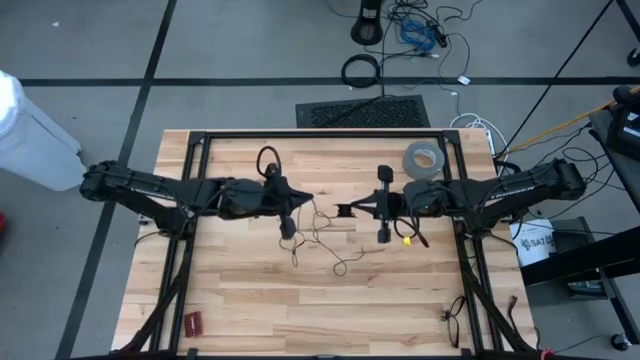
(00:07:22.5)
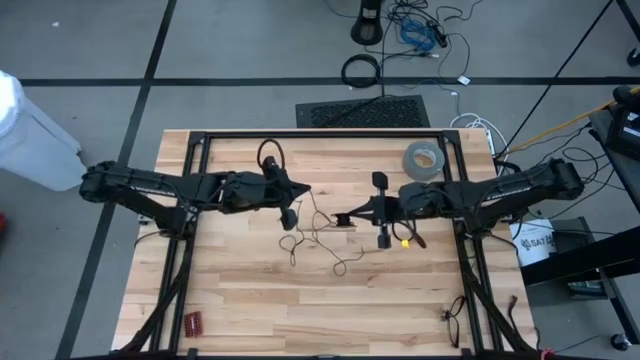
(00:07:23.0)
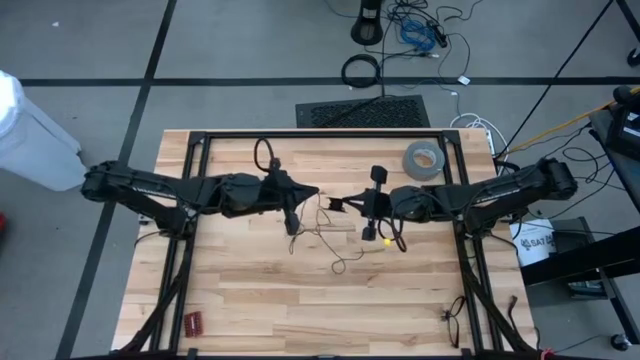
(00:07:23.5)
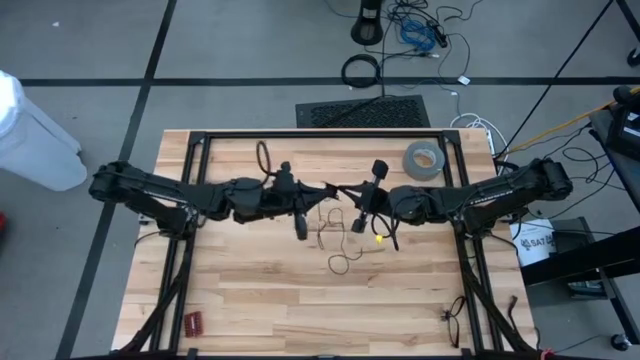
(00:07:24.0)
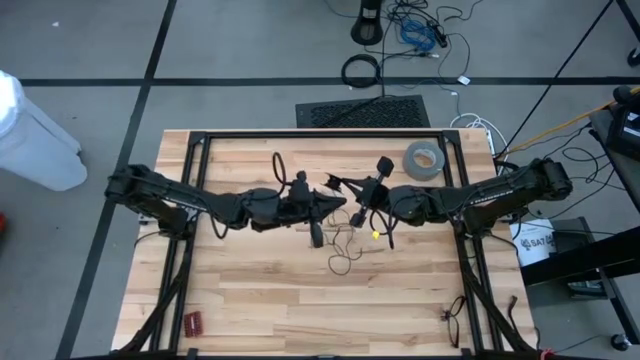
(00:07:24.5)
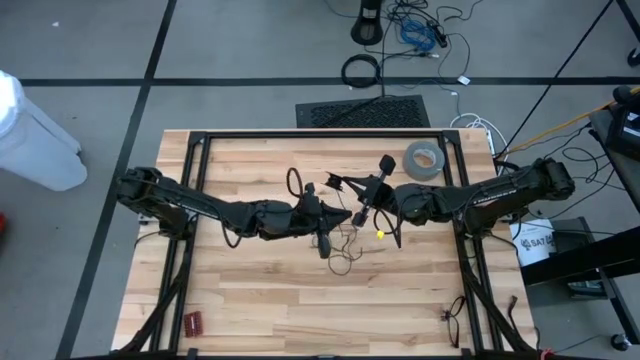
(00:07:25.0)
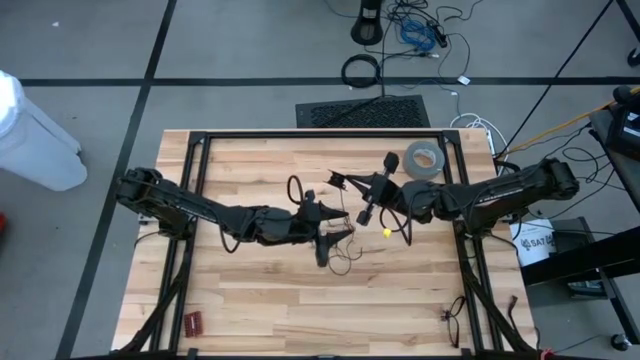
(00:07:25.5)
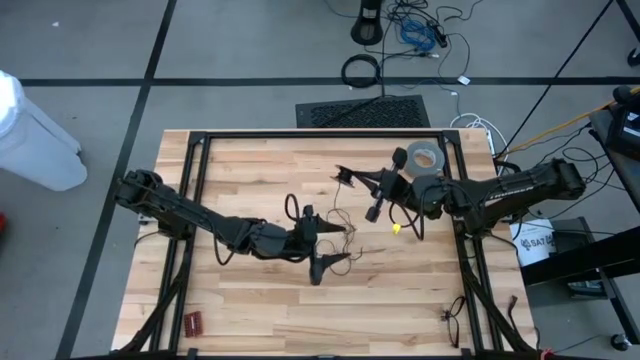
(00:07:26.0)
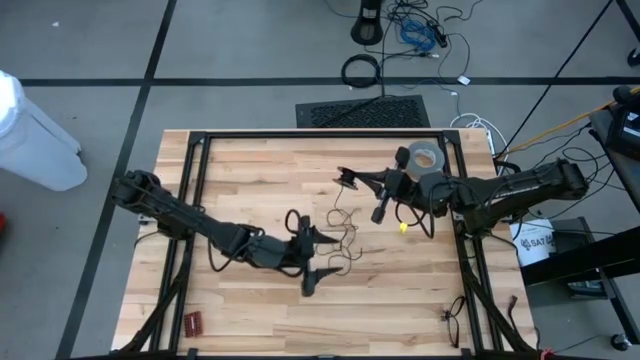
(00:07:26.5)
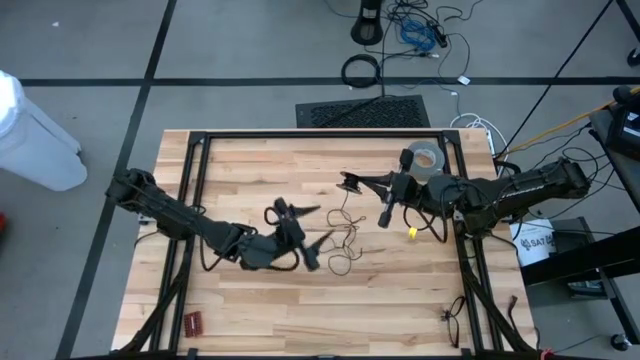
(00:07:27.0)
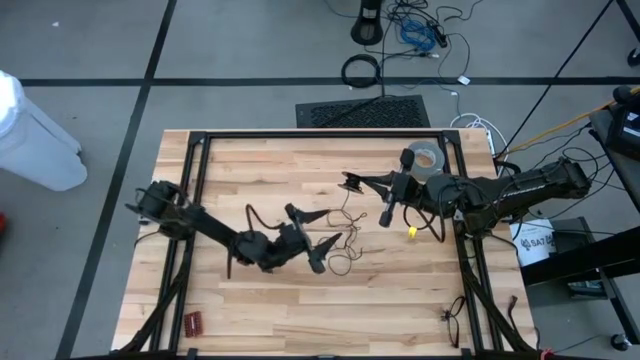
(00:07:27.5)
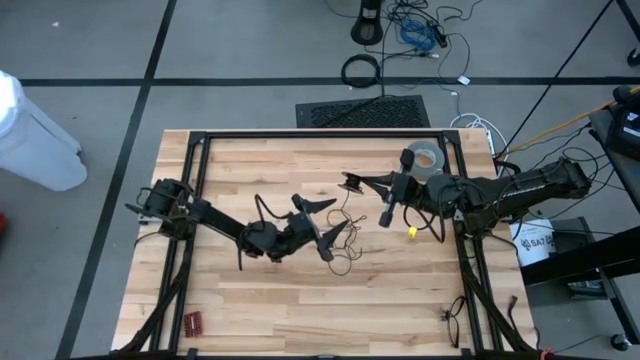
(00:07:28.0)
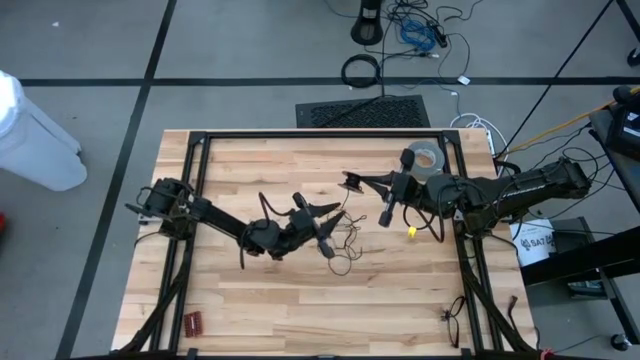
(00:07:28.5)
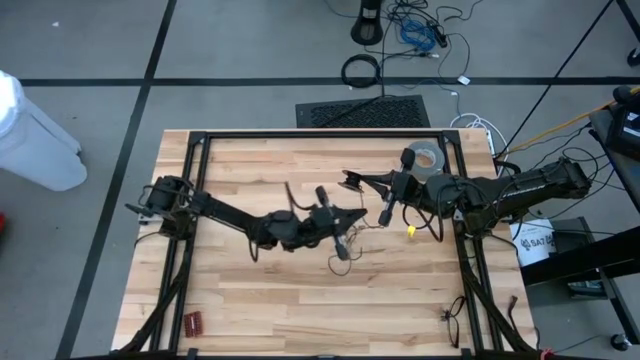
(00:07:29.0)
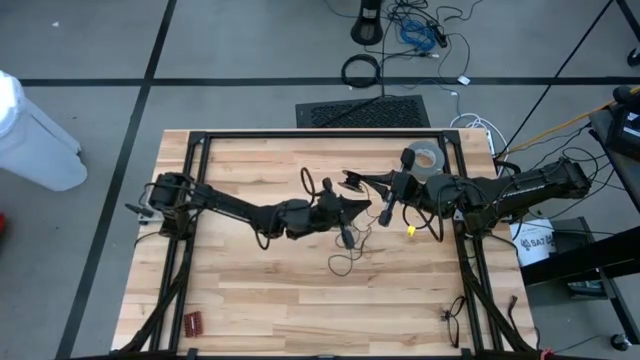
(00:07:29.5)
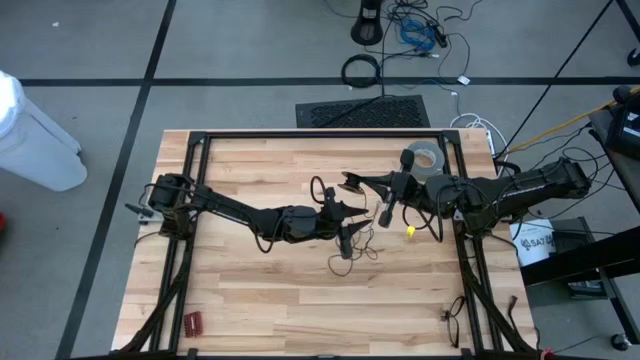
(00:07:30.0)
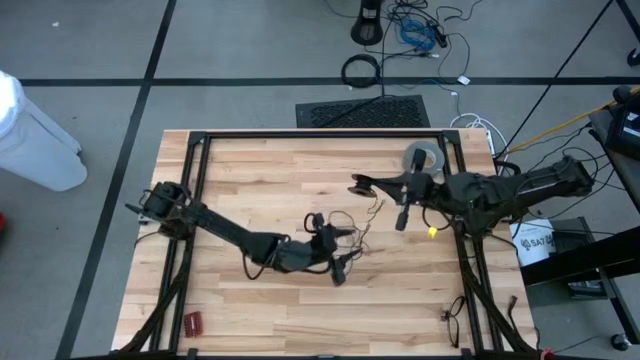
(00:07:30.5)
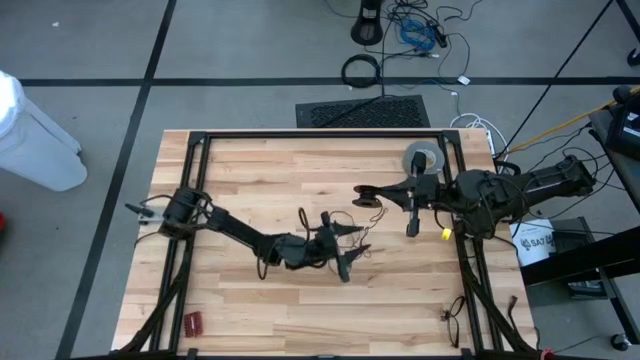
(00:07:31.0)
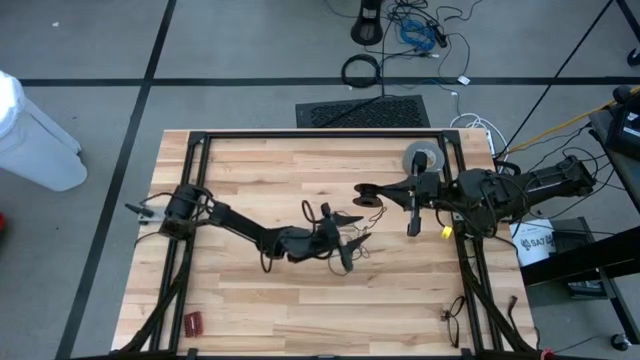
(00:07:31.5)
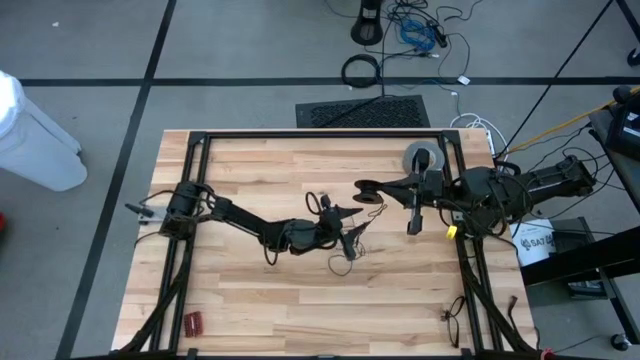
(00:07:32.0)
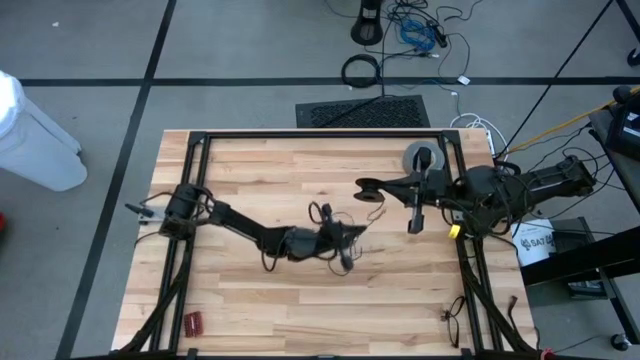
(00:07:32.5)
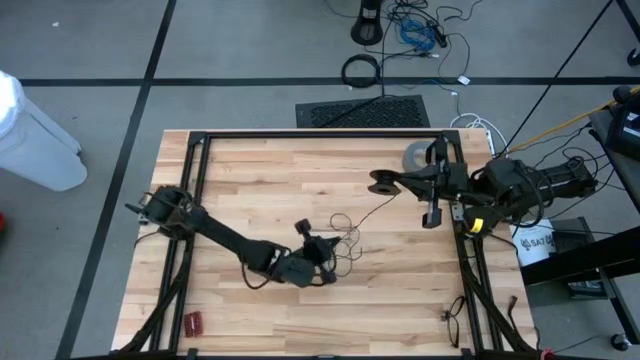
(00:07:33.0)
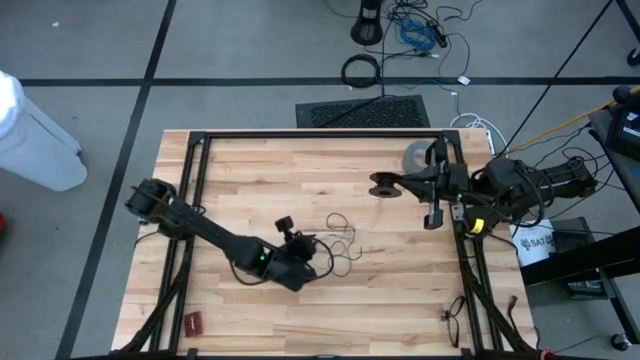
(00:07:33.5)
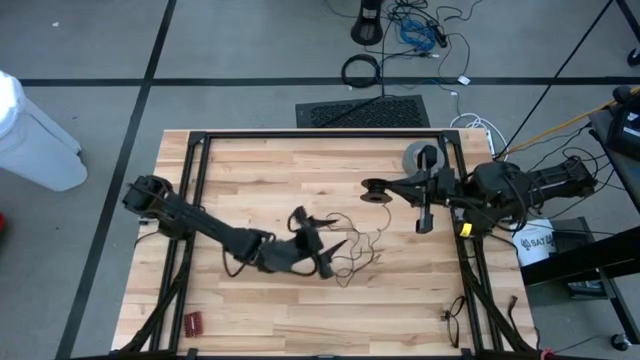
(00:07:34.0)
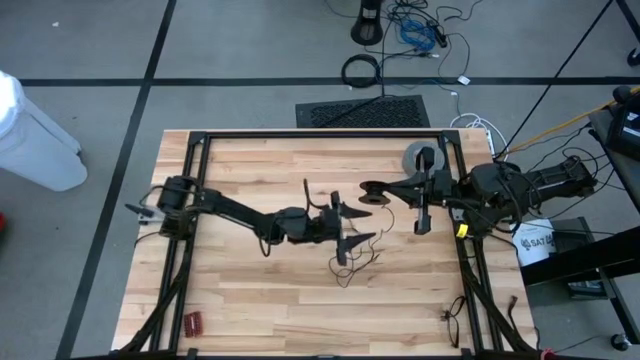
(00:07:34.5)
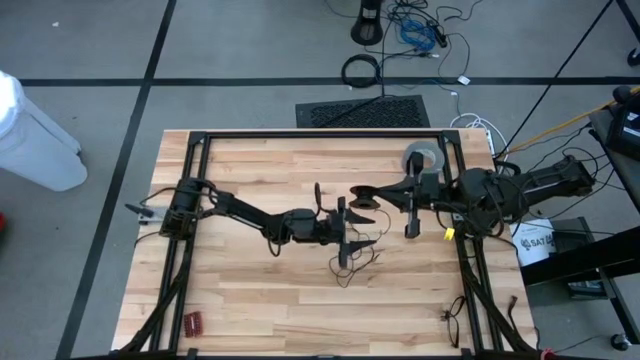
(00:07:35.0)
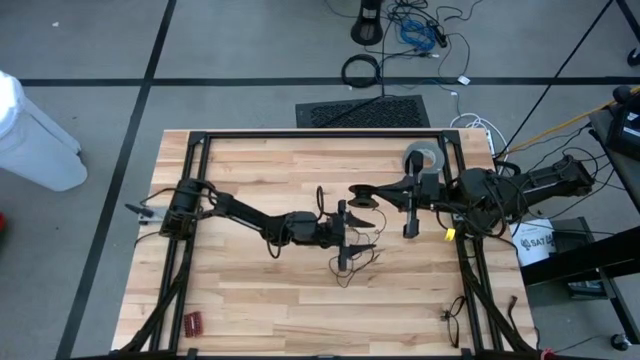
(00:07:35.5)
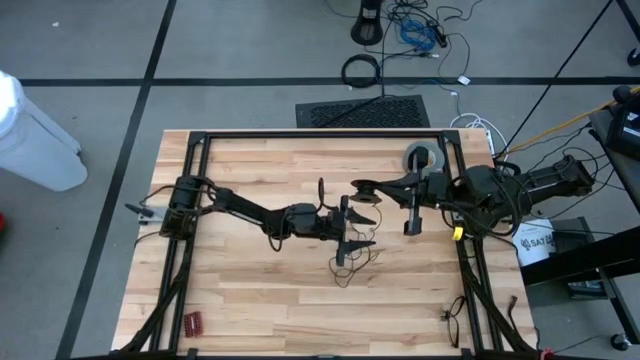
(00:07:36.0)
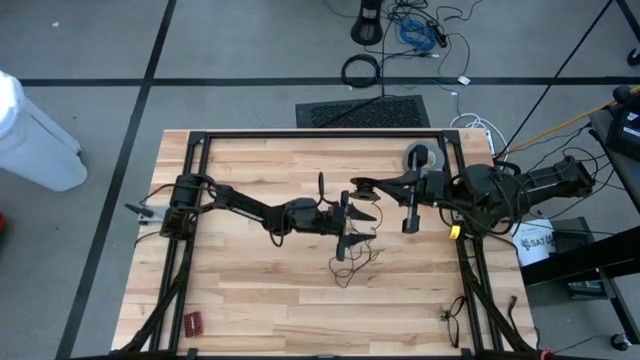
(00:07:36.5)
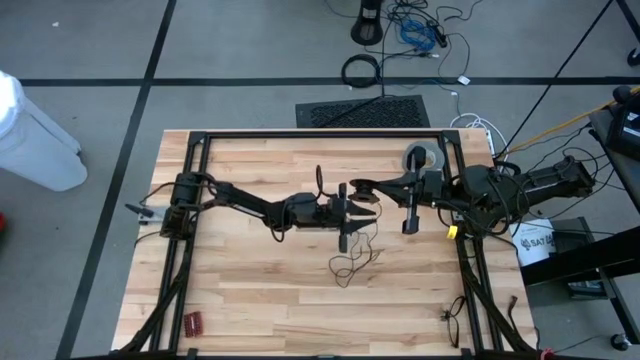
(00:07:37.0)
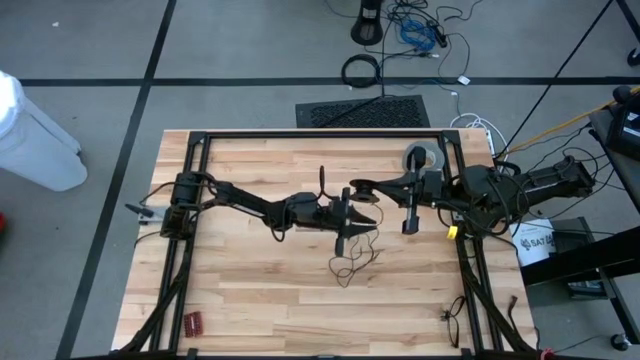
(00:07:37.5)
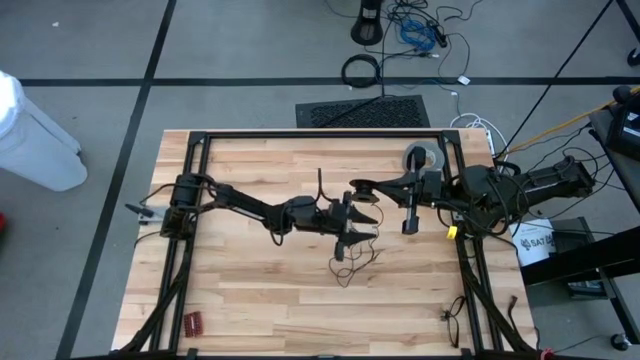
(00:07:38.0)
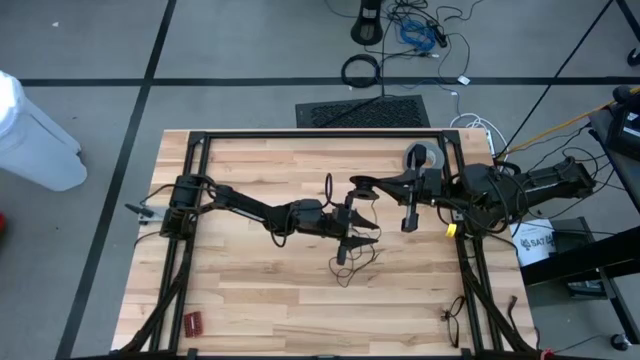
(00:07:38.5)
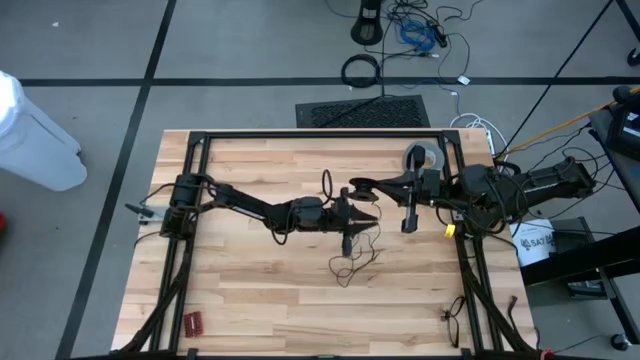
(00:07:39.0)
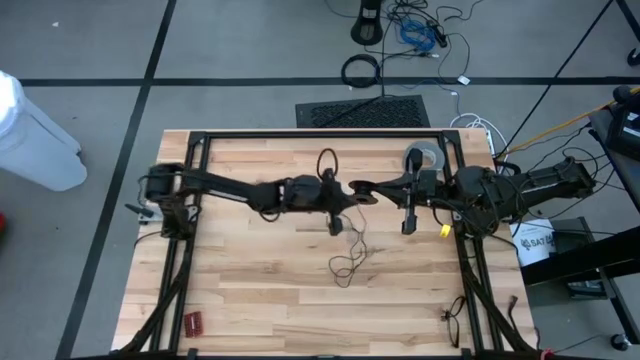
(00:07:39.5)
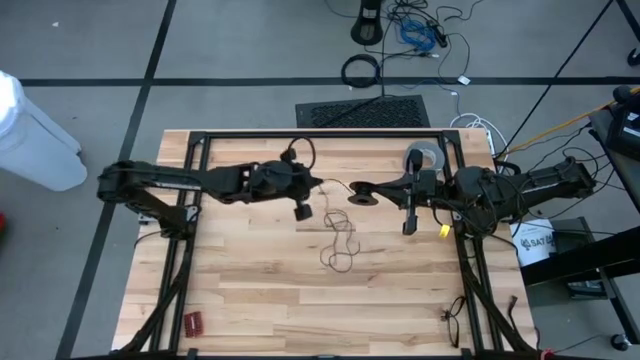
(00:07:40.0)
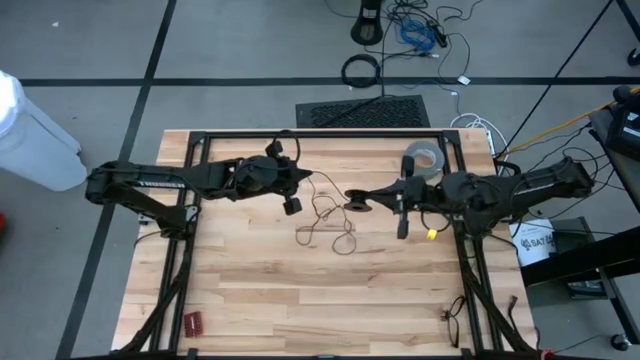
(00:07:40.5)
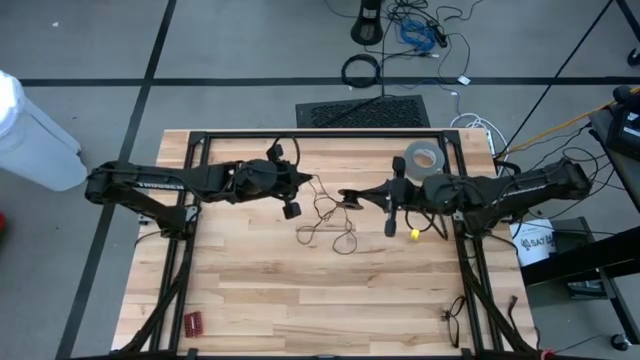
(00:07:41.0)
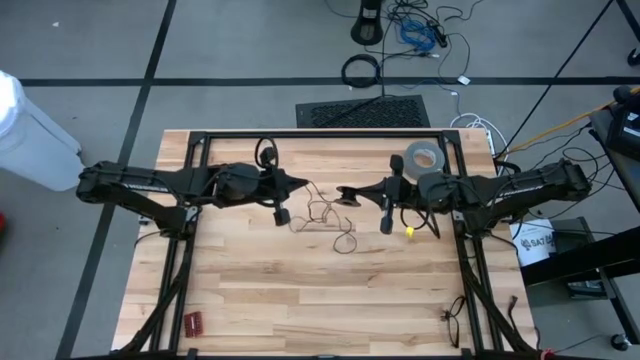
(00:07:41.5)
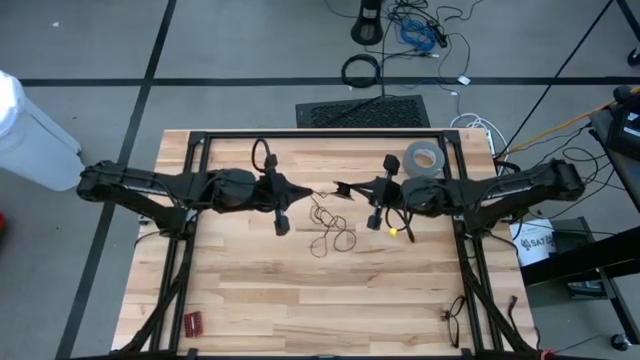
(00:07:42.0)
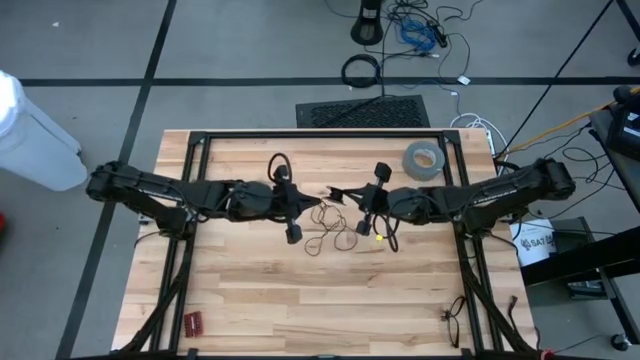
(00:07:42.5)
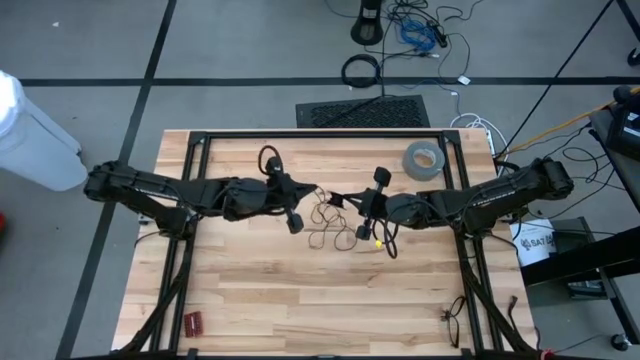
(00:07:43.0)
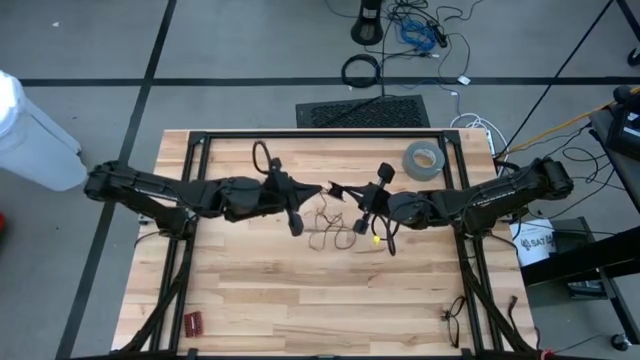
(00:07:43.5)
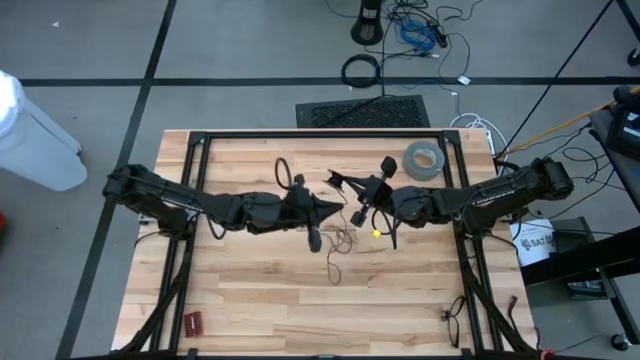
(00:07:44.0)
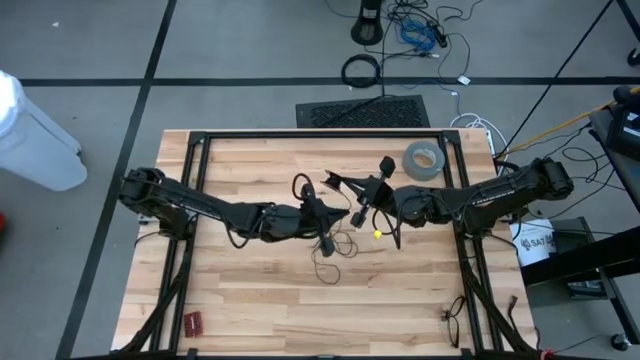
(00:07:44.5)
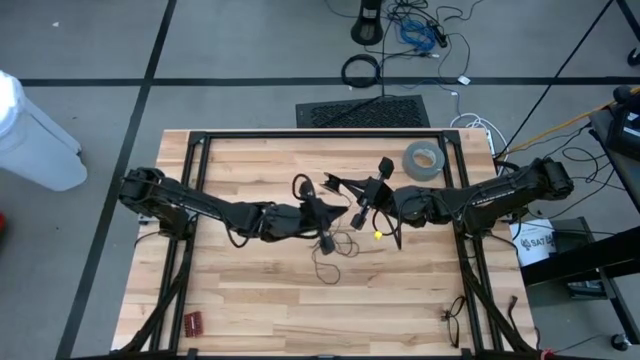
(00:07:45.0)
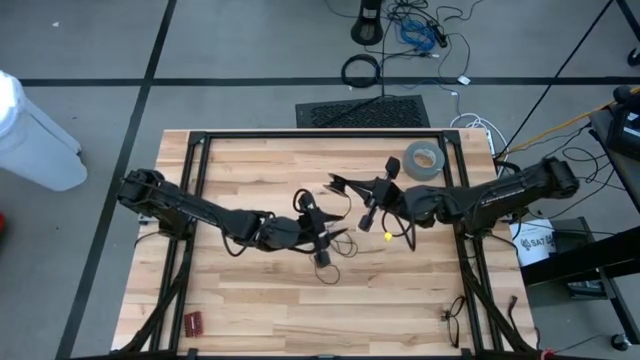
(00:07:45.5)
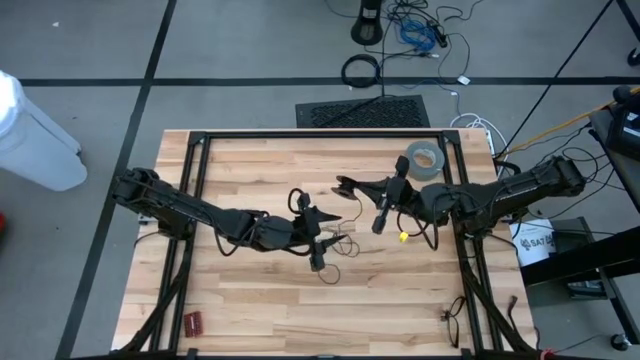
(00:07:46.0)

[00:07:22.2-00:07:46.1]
Task: Coil cords
Coil the black wire onto the spool
